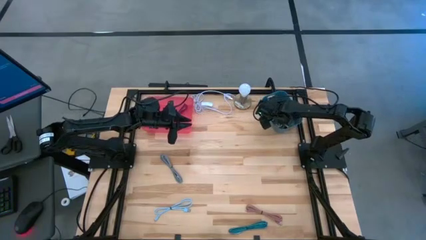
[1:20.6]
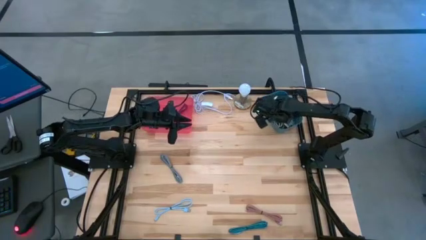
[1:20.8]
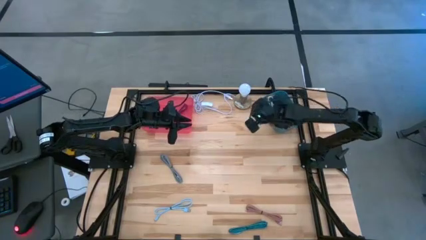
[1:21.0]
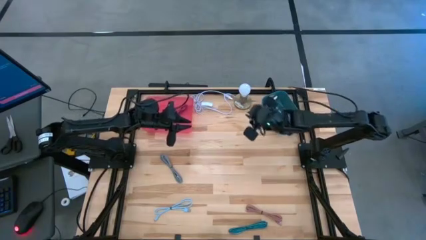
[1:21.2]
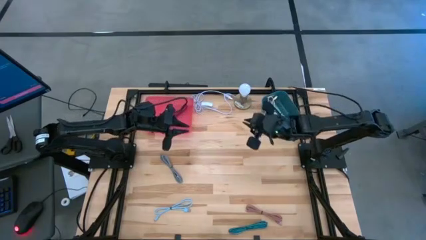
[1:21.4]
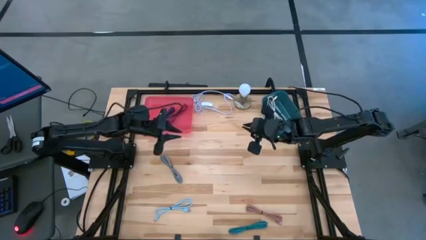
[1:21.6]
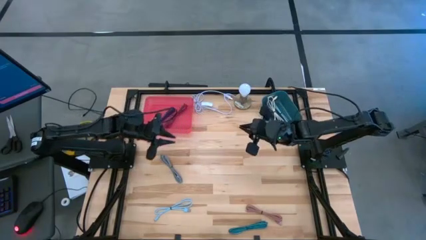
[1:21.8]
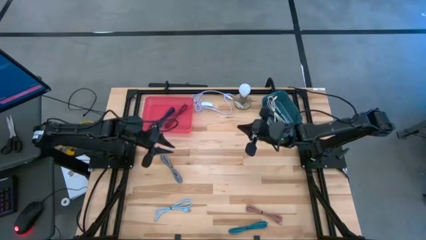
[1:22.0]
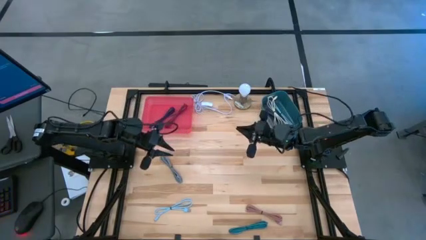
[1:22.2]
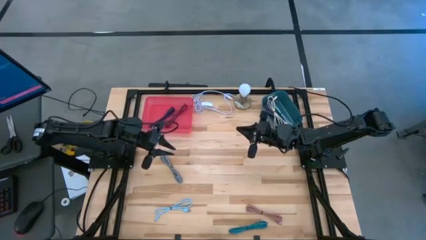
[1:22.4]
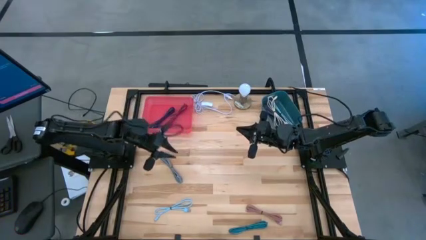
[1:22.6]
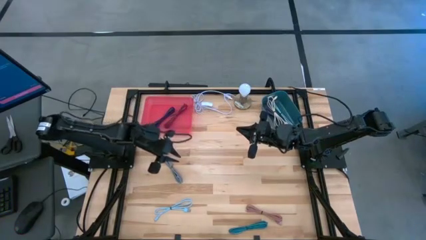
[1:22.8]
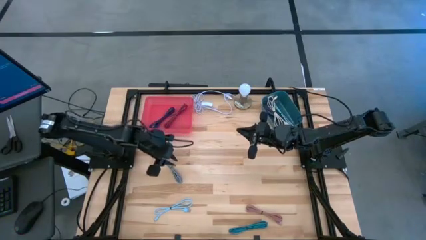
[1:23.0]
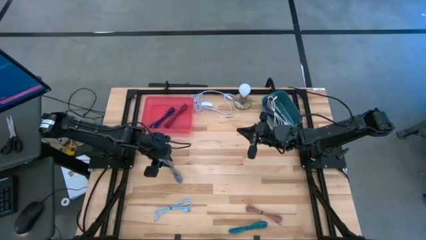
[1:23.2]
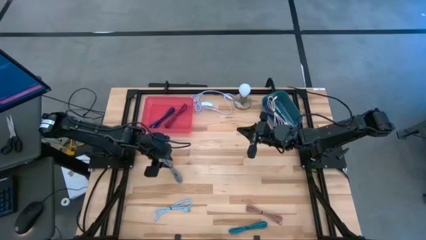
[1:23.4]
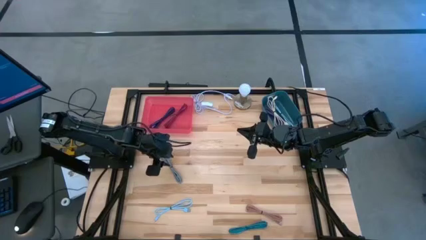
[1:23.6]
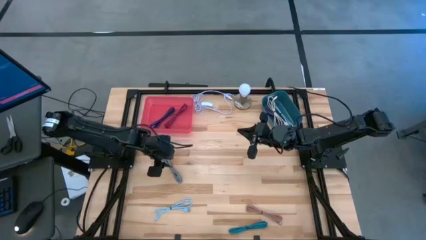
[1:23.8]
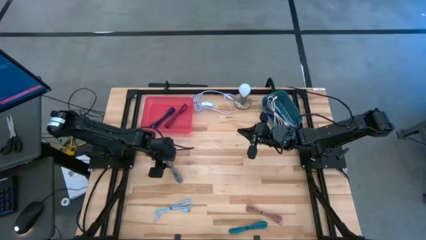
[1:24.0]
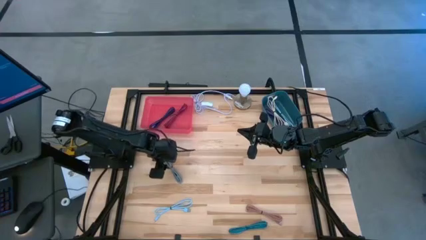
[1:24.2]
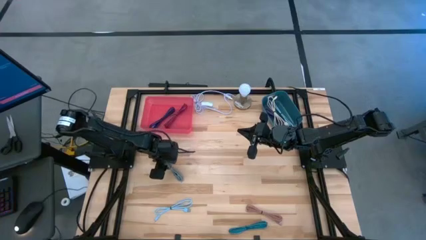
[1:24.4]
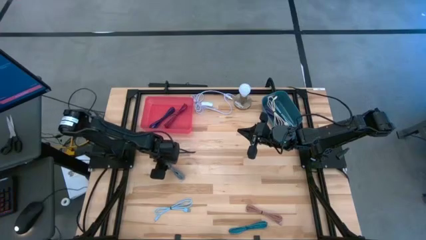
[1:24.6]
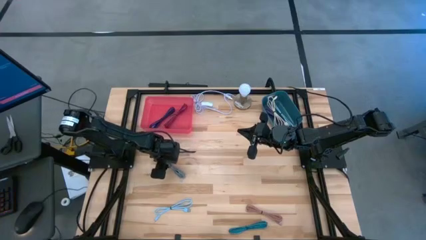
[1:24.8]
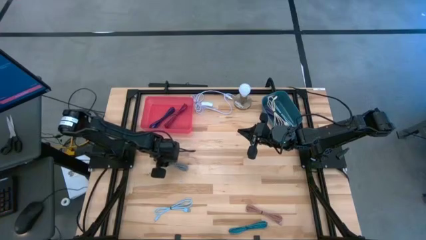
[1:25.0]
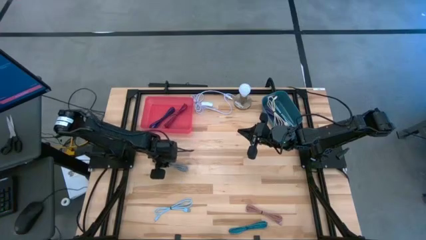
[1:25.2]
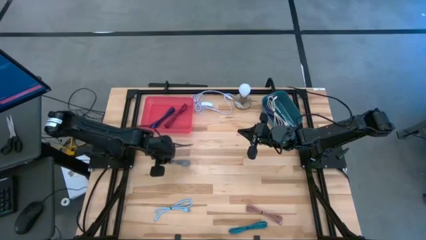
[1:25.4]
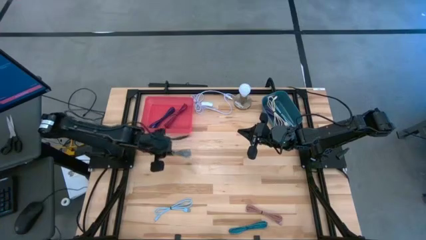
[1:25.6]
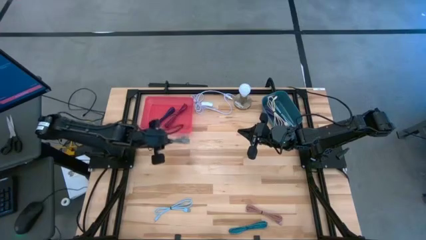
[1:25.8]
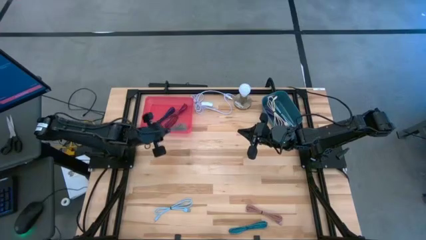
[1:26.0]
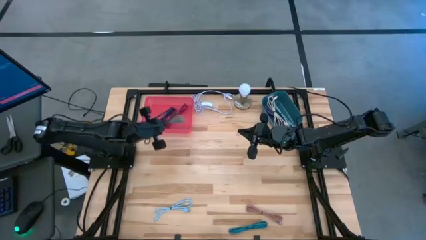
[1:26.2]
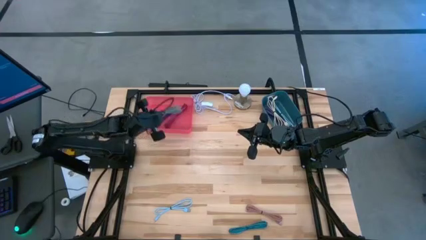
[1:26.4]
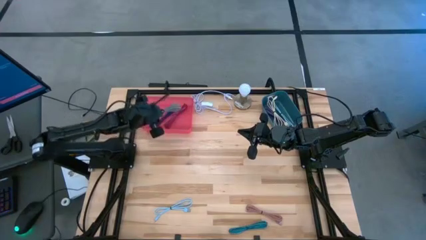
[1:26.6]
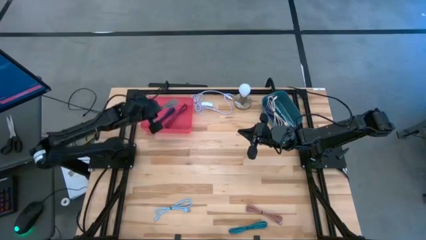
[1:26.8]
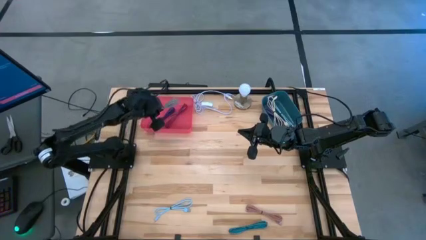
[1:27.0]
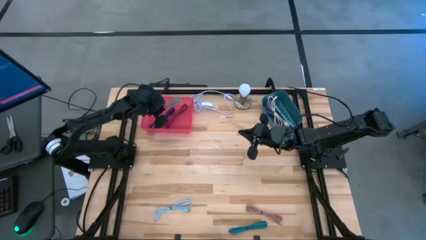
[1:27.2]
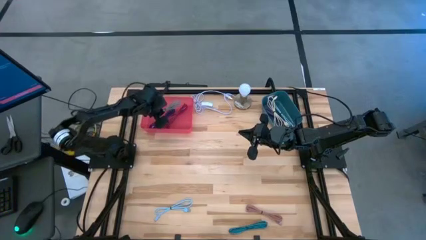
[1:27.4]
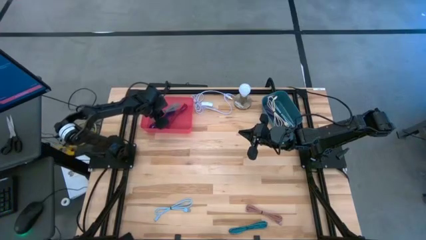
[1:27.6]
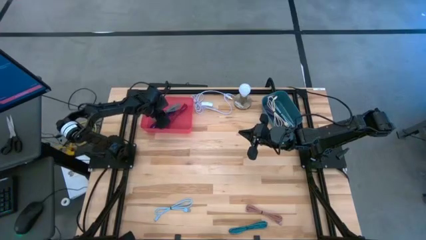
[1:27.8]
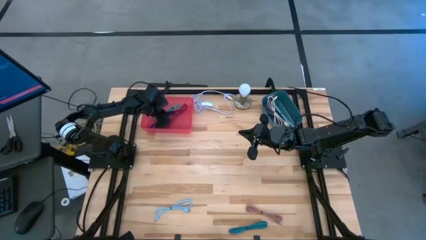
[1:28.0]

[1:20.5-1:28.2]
Task: Pick & Place USB Port
Put the black and white charger cable into the pink bin

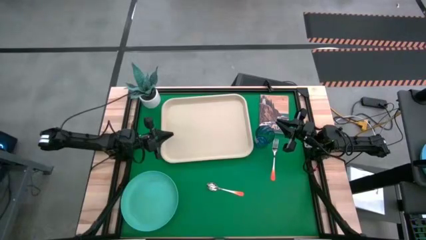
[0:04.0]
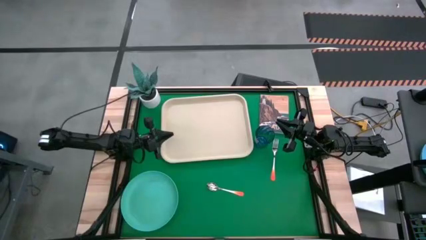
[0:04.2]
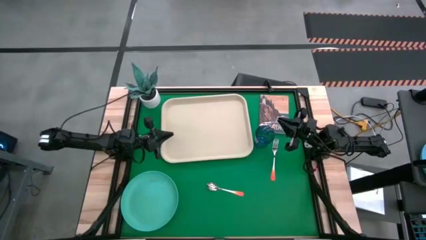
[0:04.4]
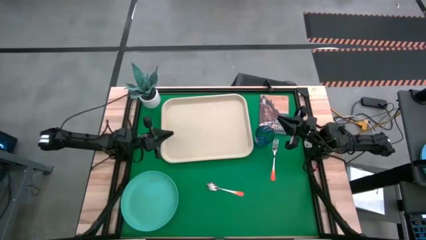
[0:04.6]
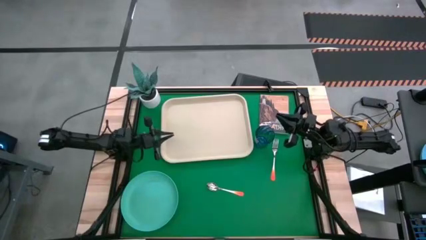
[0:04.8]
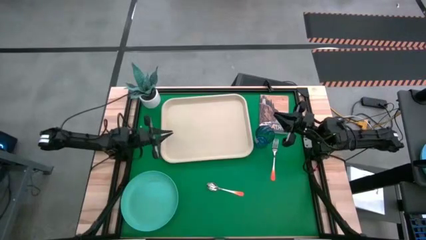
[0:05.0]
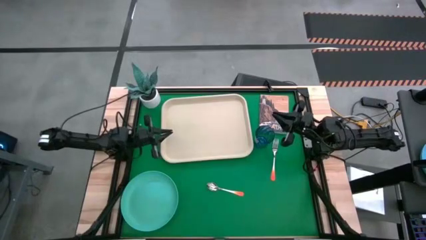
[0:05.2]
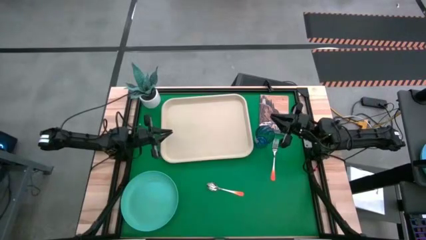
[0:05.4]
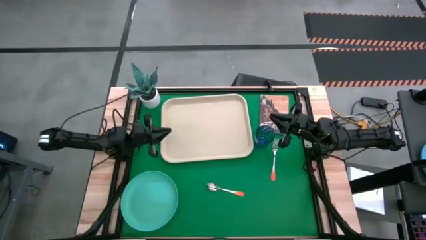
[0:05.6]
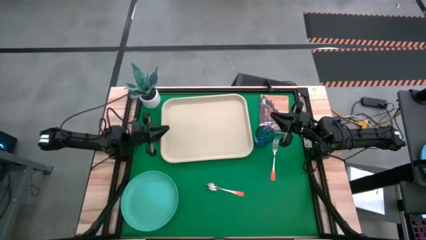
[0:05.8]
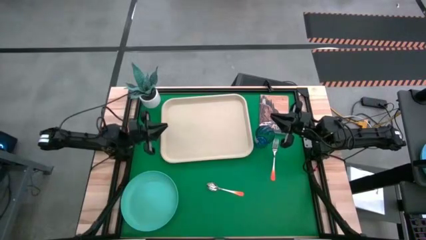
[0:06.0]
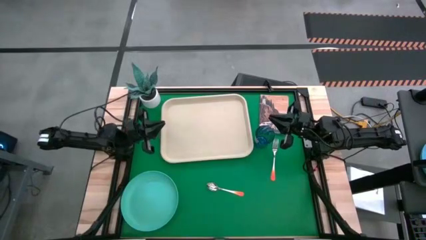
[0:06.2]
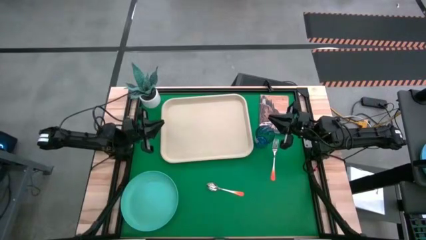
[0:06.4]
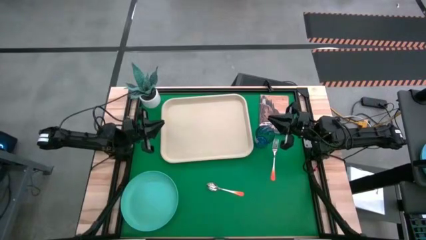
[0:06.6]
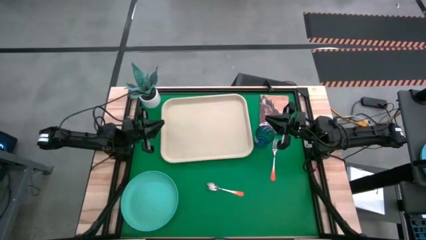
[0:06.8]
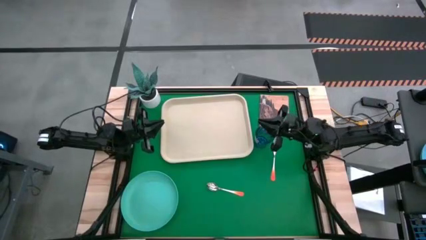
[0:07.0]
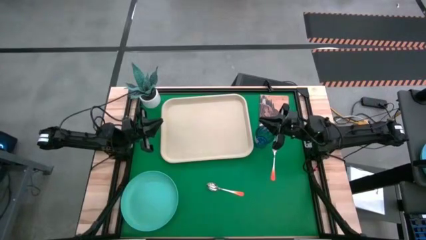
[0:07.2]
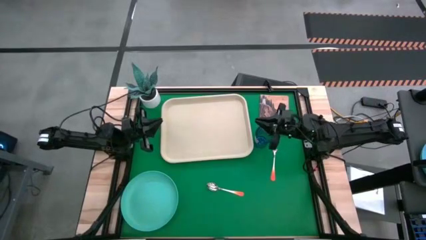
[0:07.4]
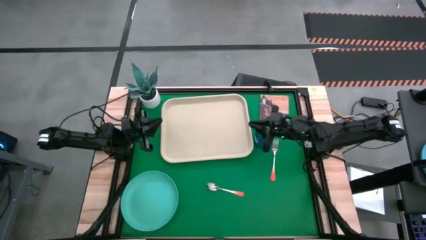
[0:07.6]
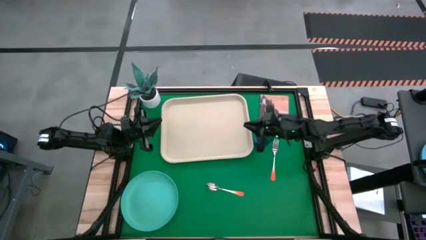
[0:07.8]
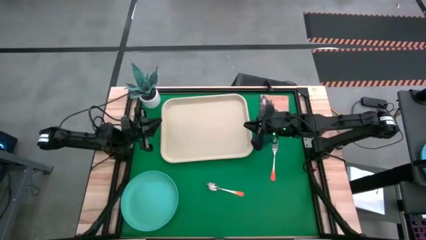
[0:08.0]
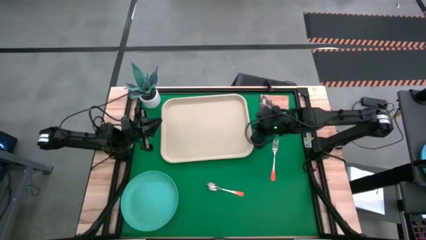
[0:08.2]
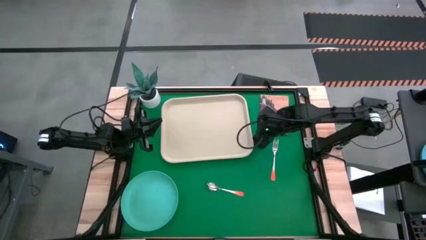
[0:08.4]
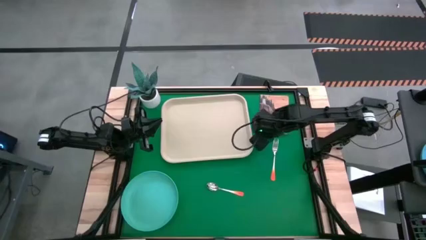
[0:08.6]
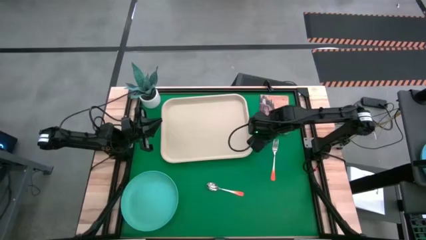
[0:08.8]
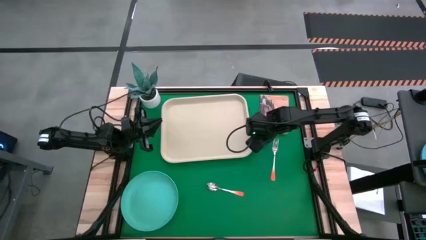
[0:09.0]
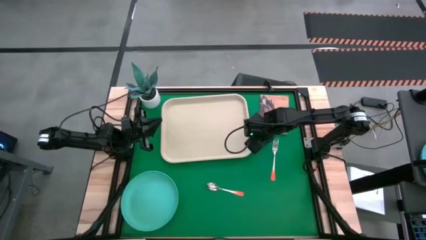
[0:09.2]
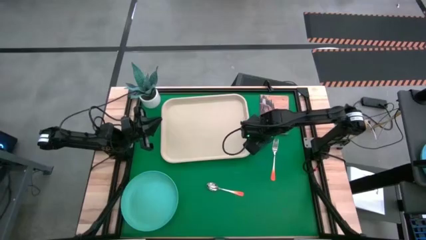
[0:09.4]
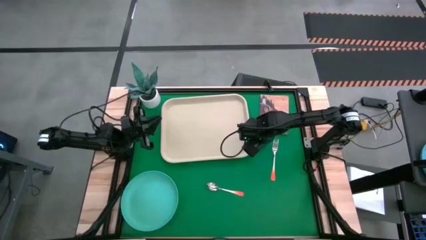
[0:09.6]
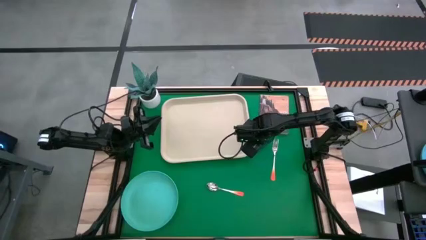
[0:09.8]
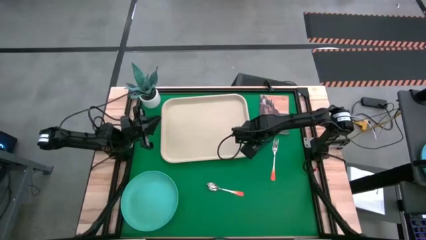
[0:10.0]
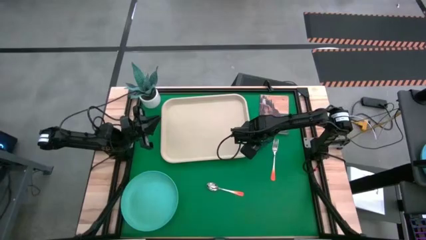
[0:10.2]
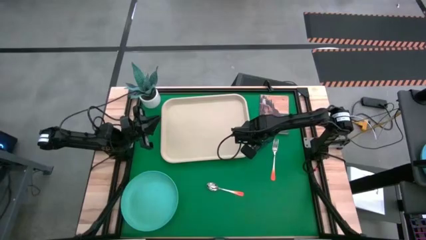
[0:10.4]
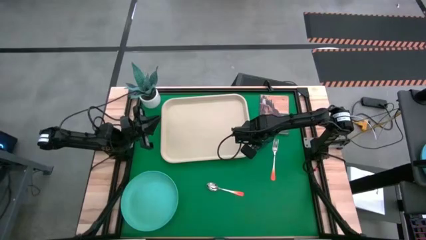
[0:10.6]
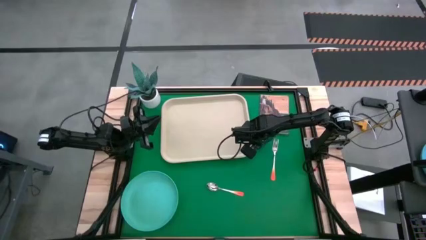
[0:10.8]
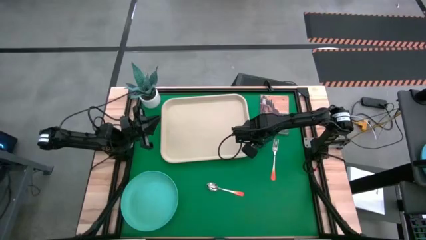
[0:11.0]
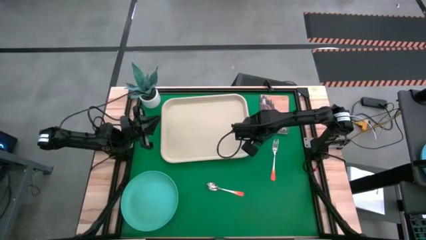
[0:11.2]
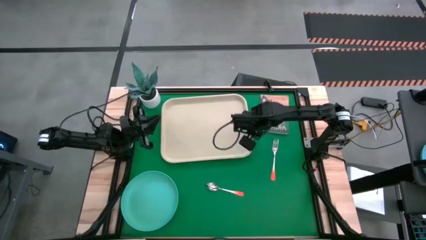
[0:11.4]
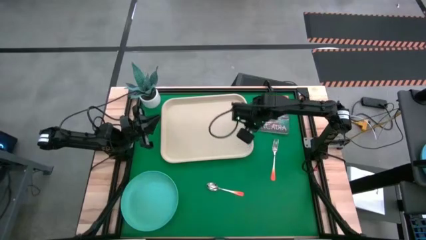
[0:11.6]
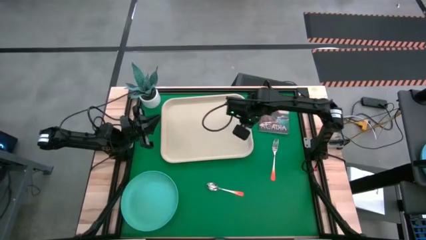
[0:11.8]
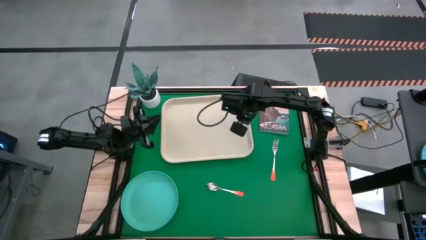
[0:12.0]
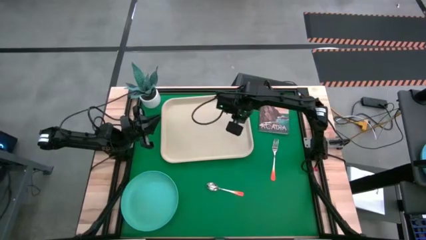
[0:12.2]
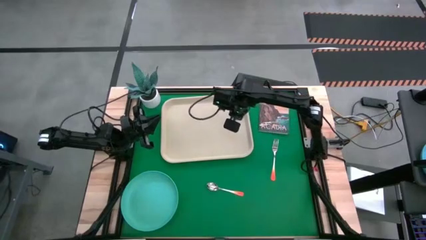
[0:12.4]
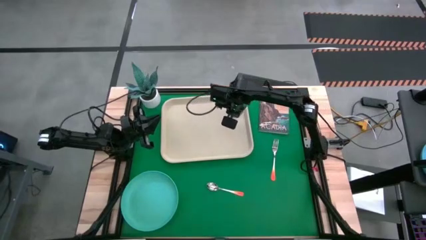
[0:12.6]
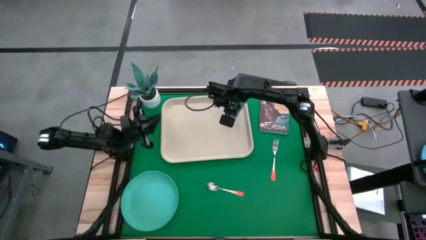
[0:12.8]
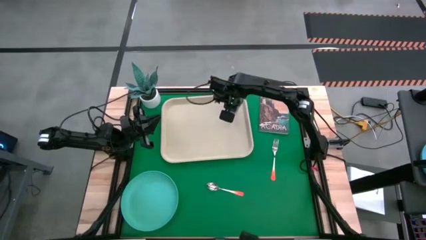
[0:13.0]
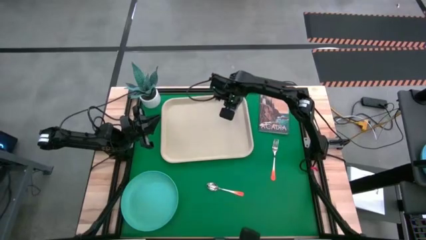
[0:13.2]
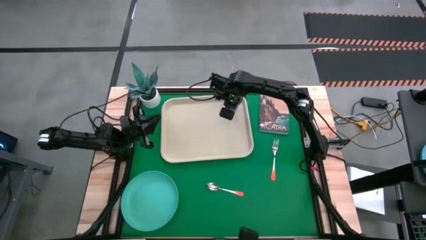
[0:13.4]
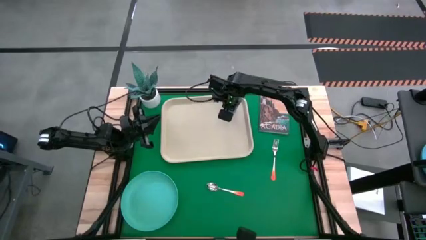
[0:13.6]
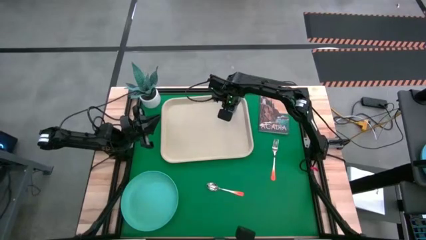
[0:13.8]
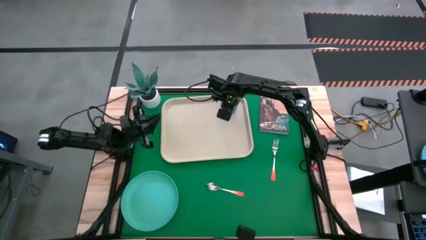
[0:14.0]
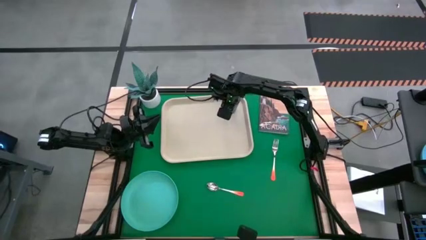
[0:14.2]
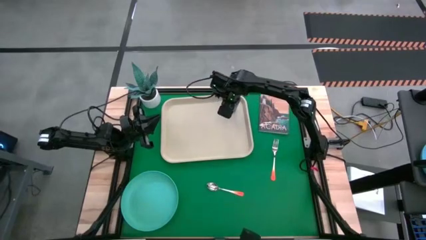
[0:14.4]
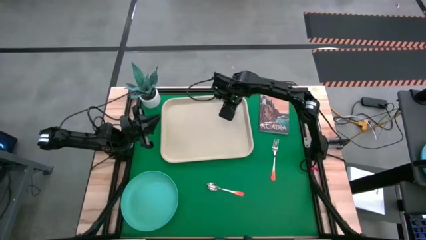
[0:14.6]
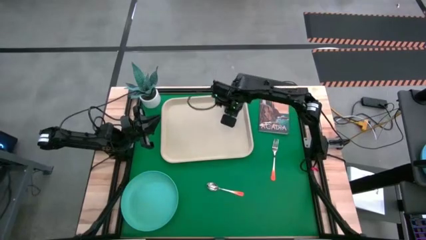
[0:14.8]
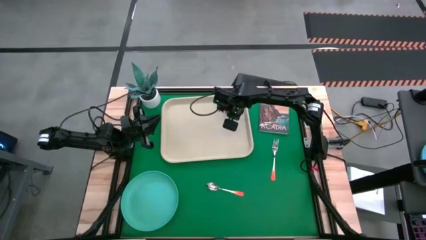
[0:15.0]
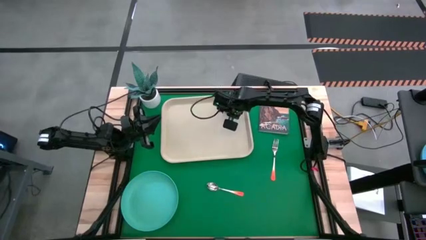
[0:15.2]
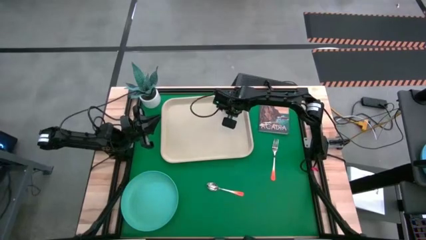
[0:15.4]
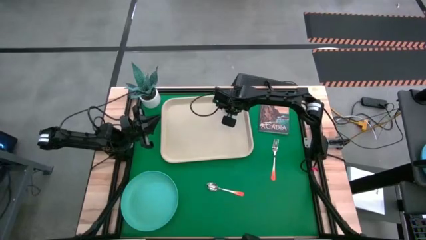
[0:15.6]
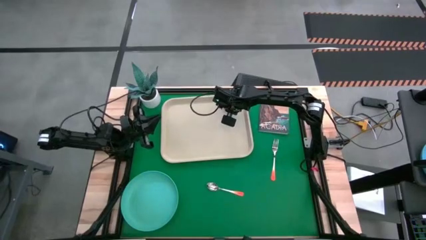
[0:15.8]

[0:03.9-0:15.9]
Task: Pick and place plate/cup/fork/spoon on tray
Put the blue cup on the light brown serving tray
